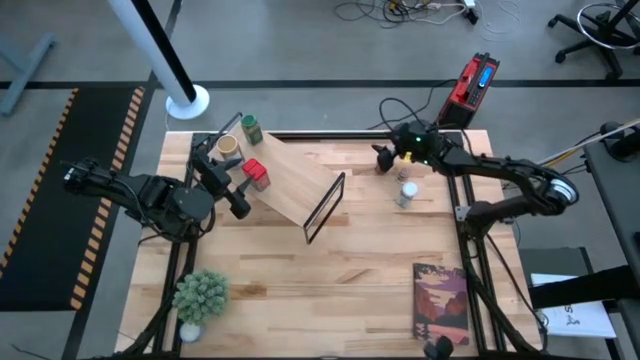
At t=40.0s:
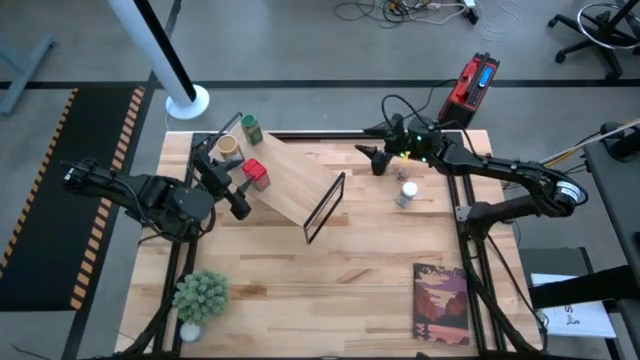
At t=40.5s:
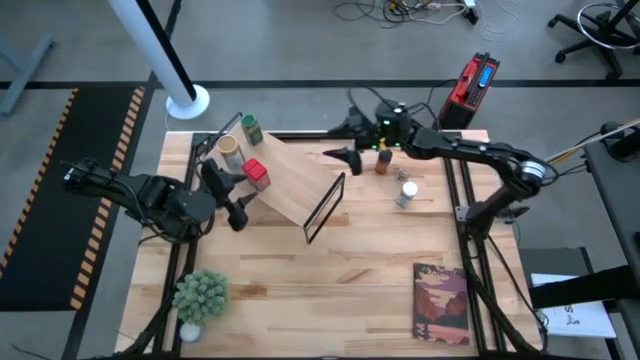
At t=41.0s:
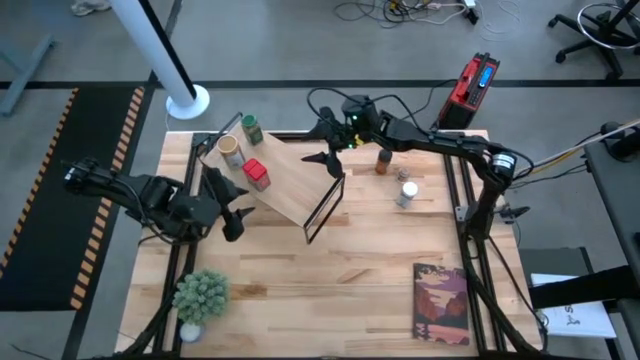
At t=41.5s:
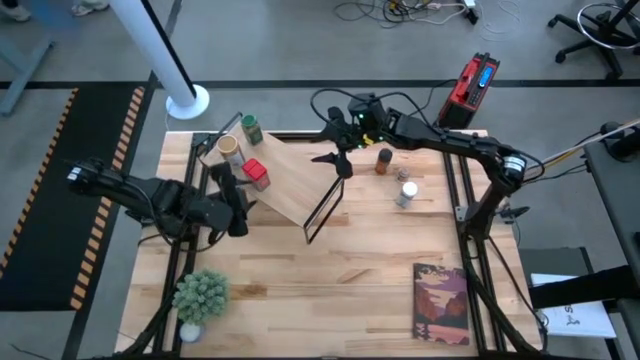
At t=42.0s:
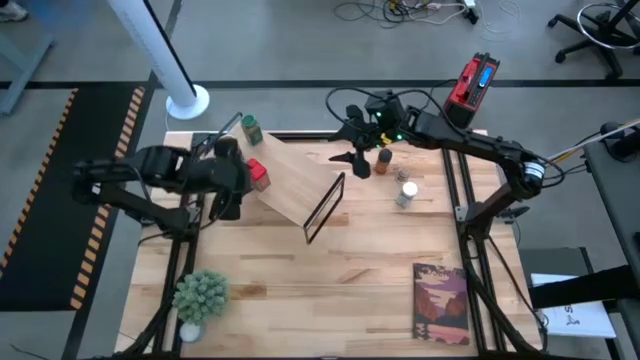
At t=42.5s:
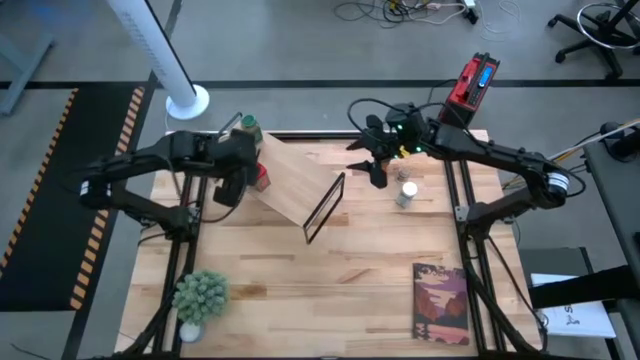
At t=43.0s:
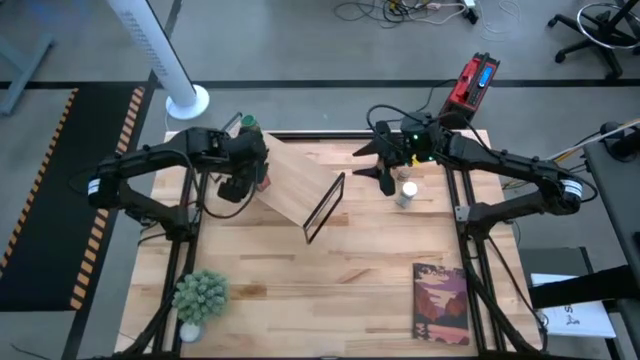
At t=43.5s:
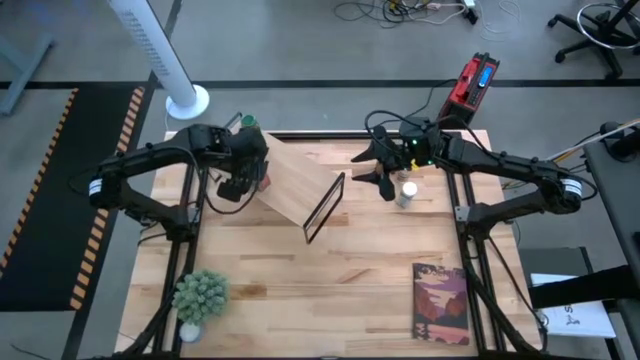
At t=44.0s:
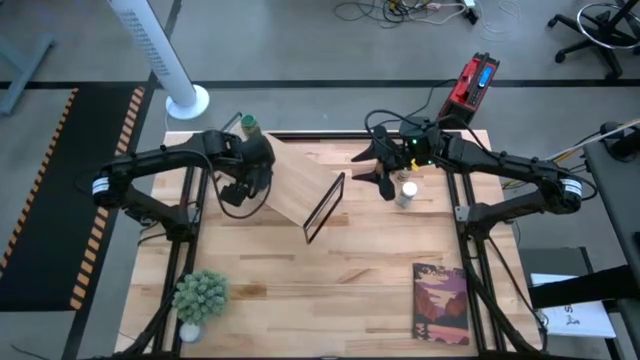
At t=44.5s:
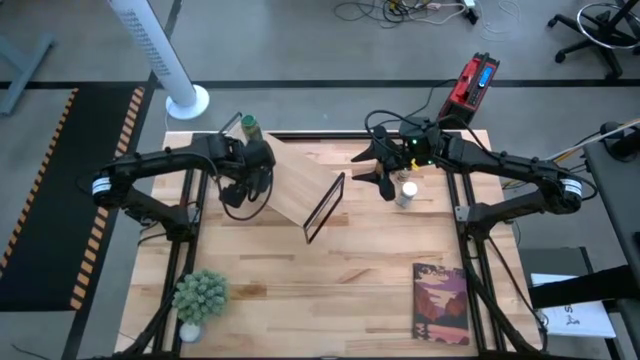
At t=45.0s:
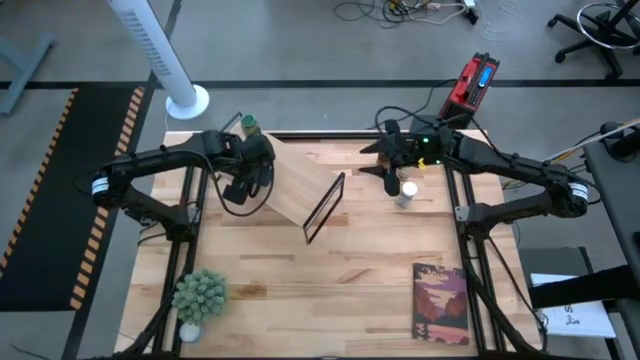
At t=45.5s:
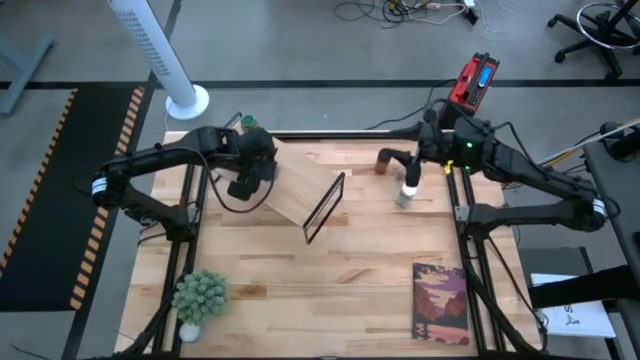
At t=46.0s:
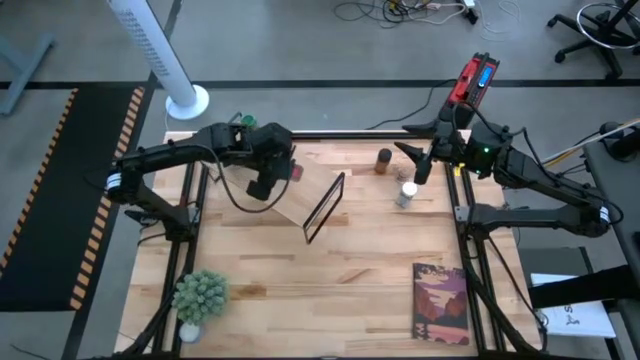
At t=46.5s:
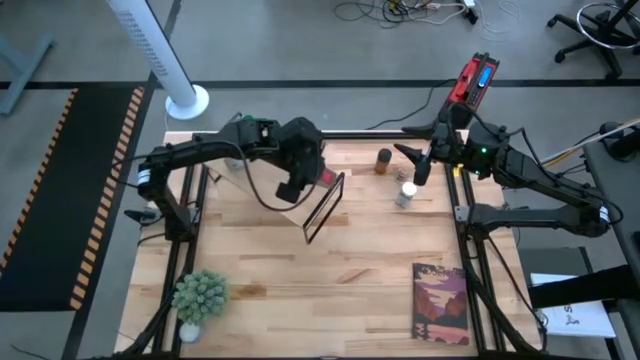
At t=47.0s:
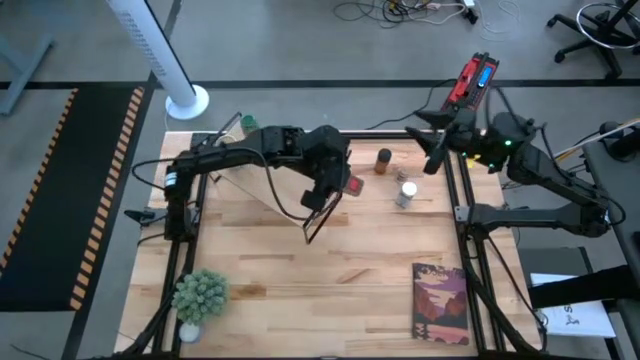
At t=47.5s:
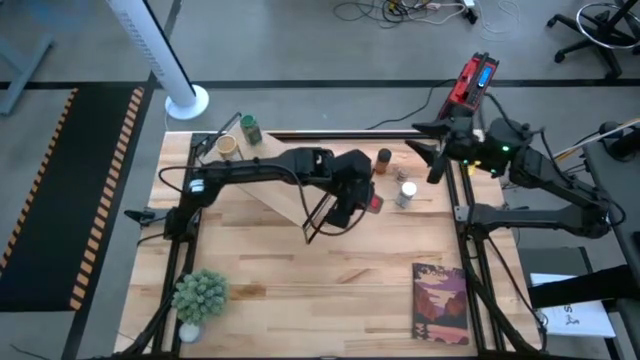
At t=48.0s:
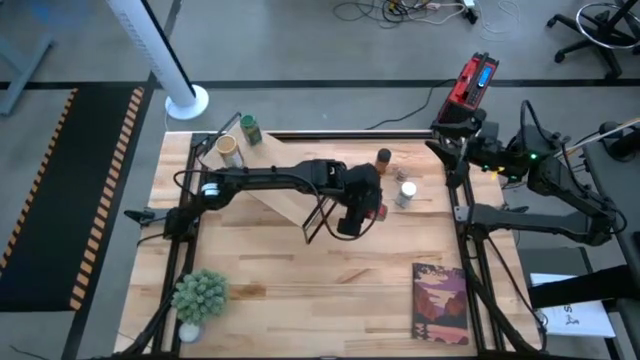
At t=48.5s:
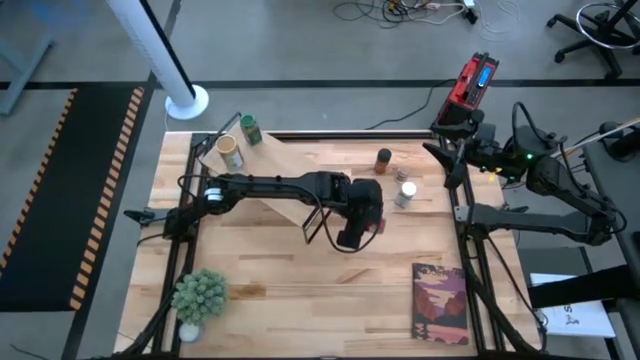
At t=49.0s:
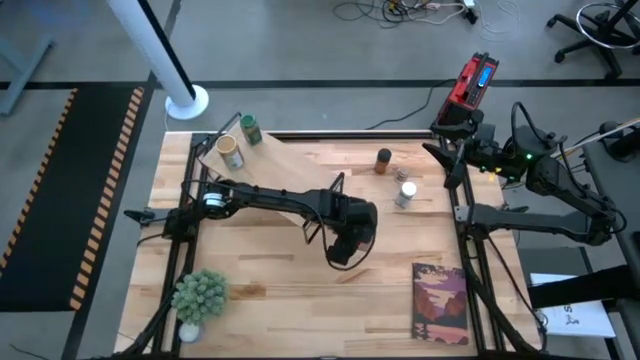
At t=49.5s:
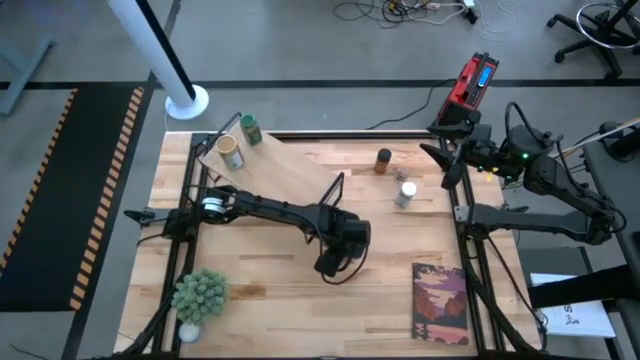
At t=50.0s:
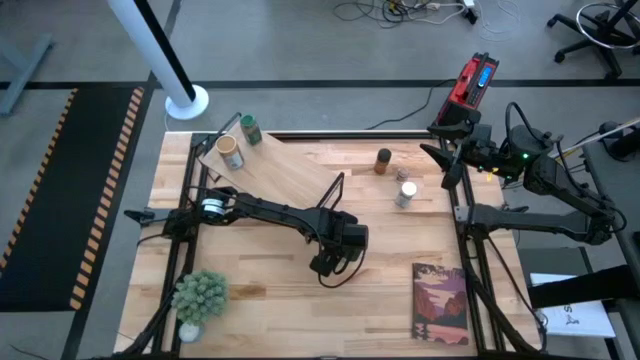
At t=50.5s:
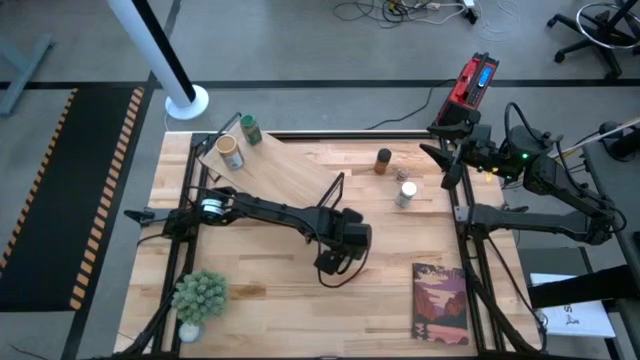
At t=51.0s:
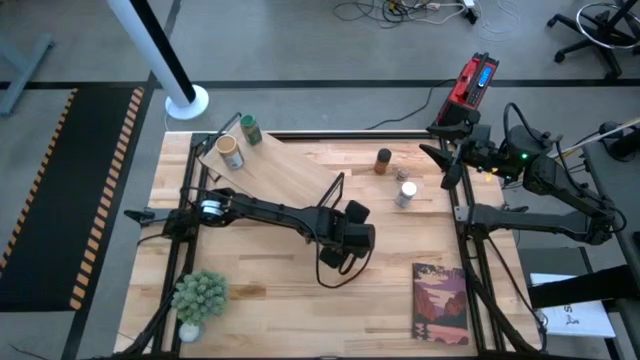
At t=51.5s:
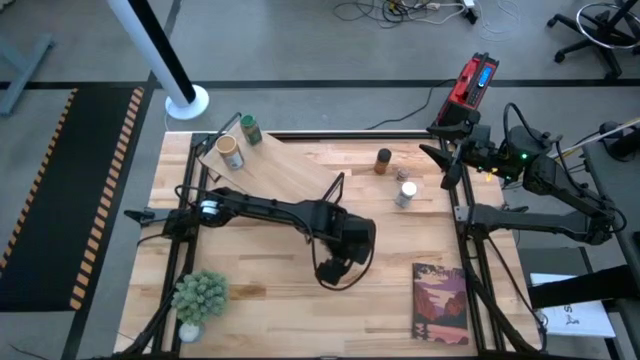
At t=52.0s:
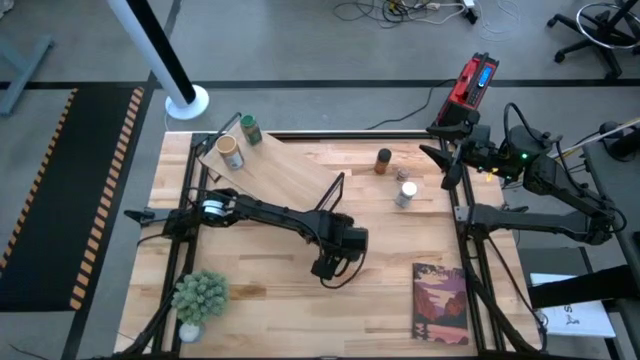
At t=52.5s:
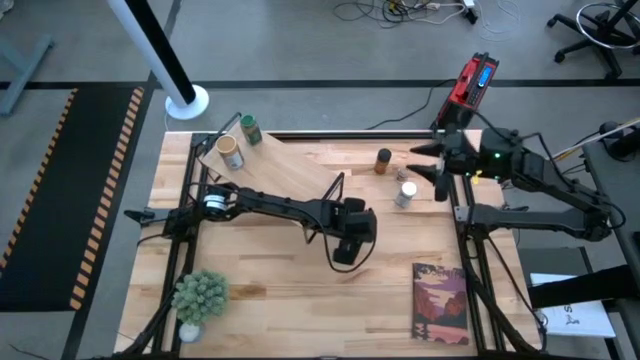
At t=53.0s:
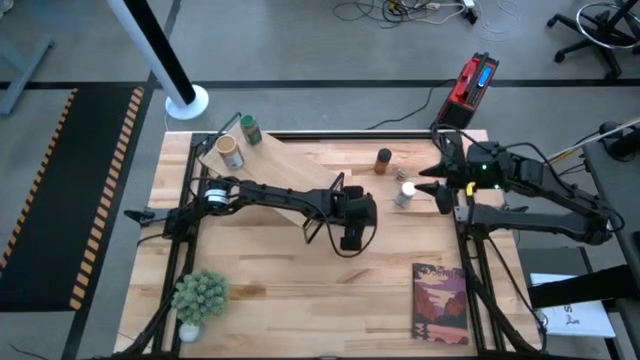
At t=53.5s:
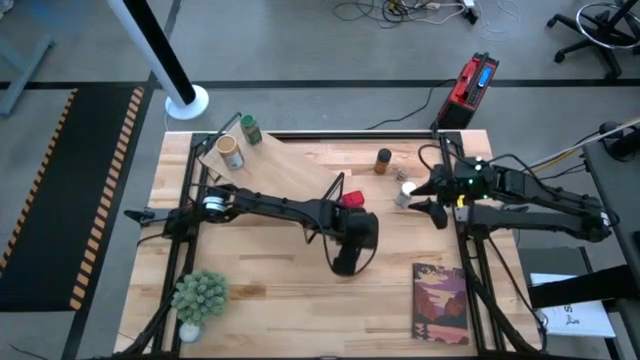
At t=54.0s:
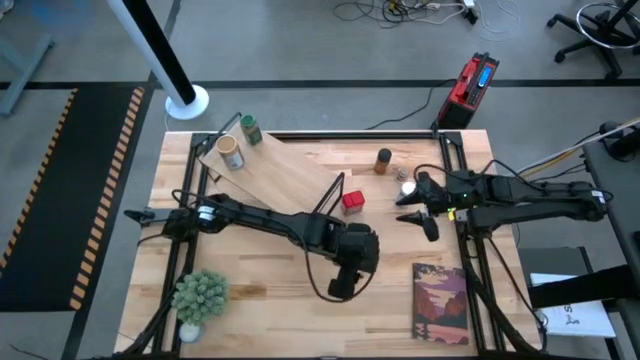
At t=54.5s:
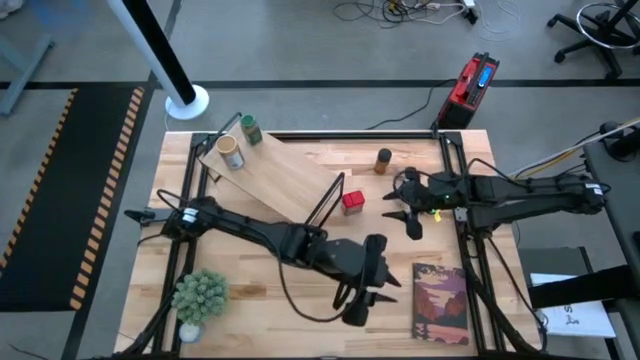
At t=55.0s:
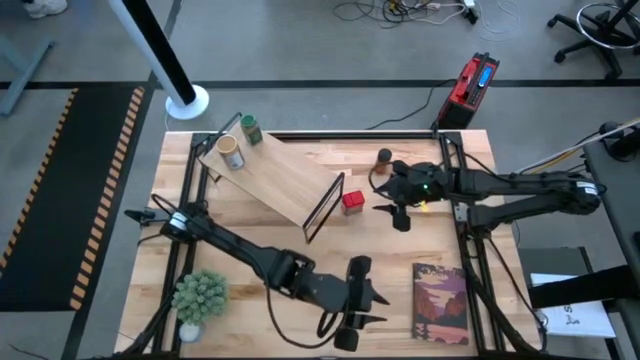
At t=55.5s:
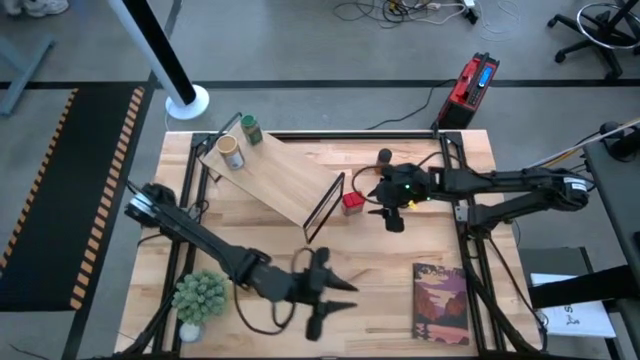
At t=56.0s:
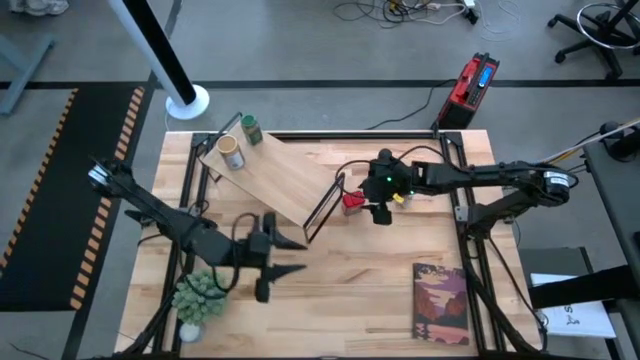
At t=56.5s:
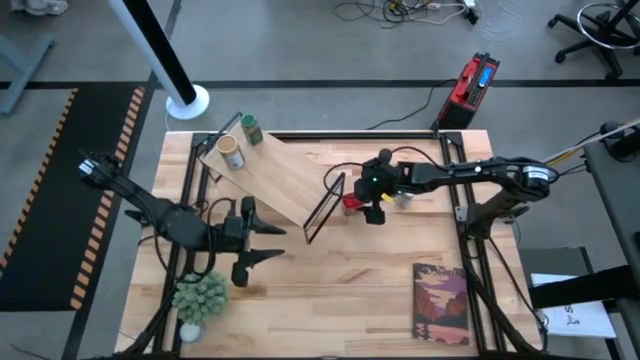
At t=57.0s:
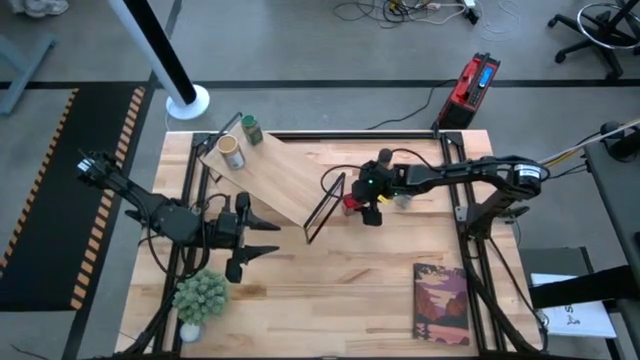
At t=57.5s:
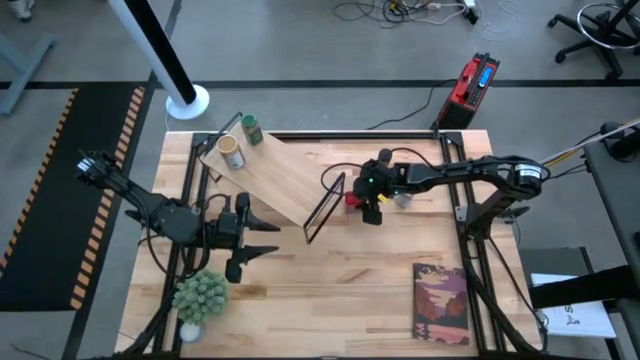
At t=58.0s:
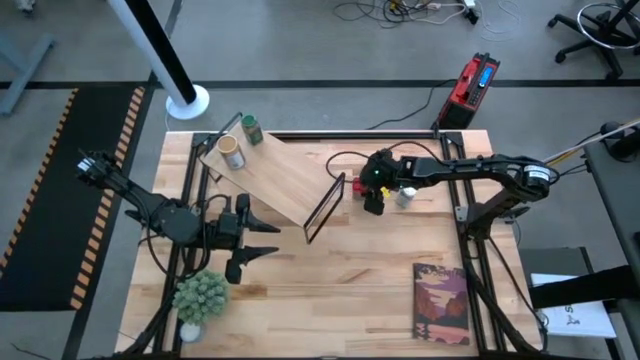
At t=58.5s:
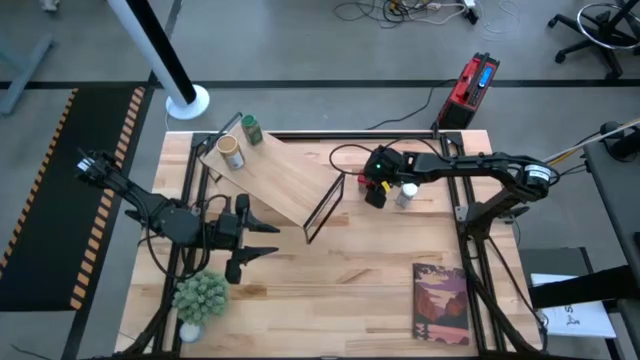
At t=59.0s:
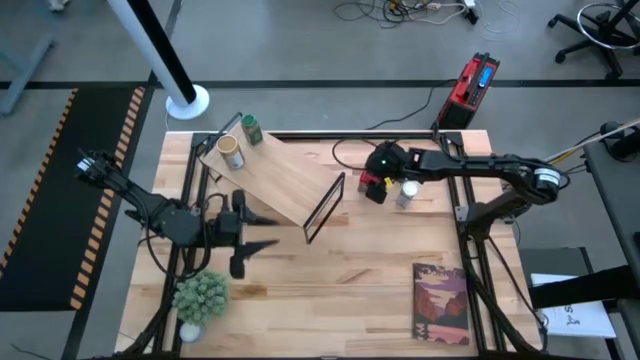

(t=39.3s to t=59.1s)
Task: Shelf spices
Remove the red seasoning can from the shelf
